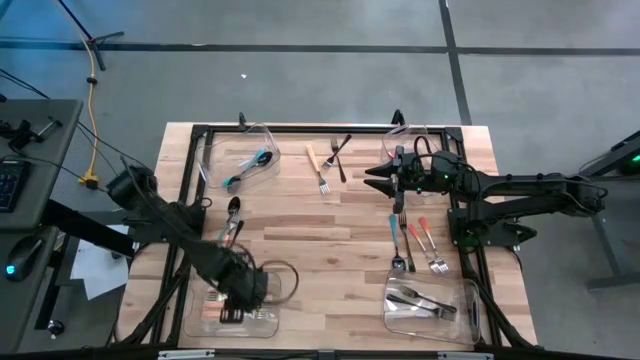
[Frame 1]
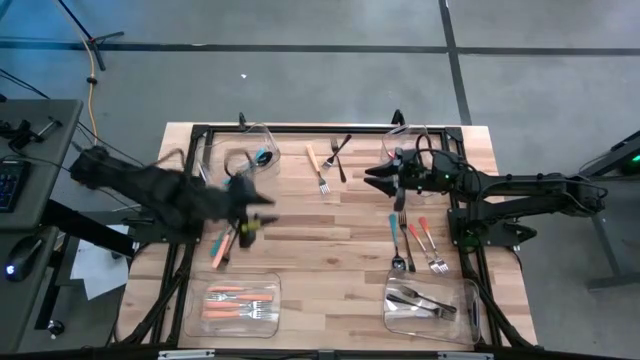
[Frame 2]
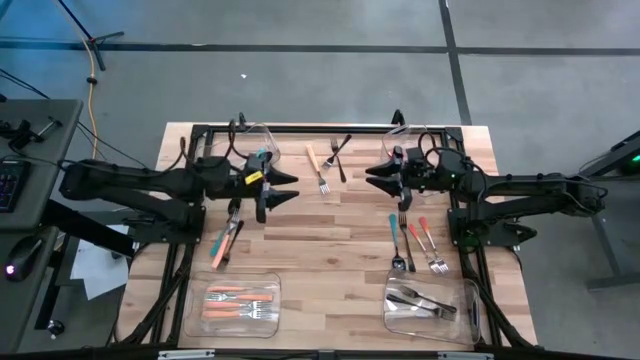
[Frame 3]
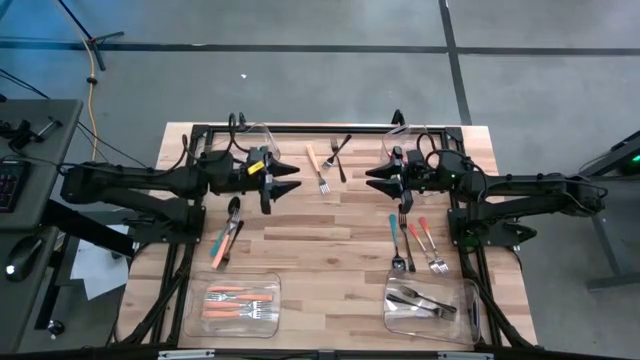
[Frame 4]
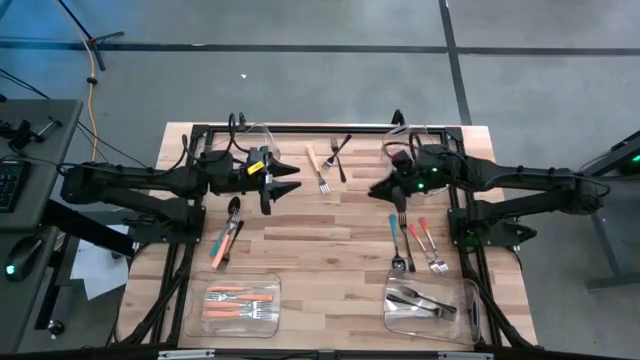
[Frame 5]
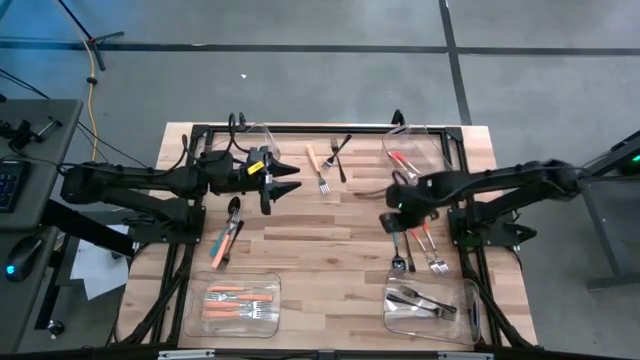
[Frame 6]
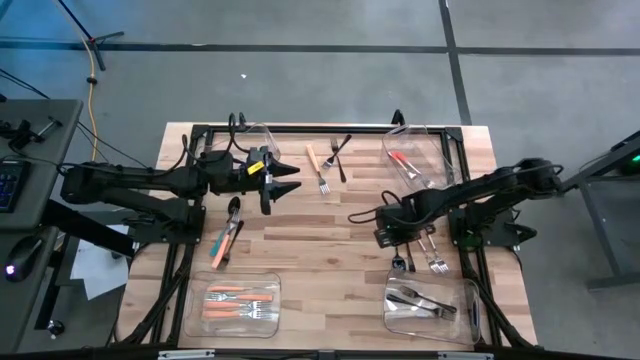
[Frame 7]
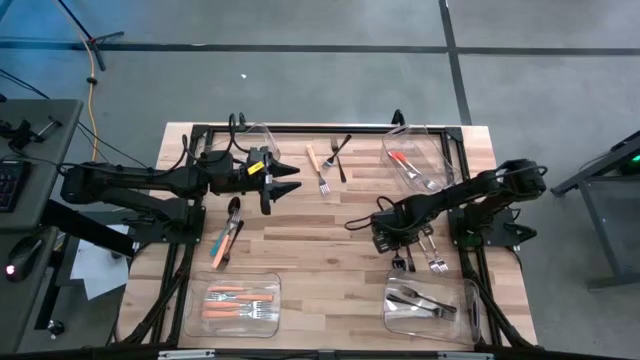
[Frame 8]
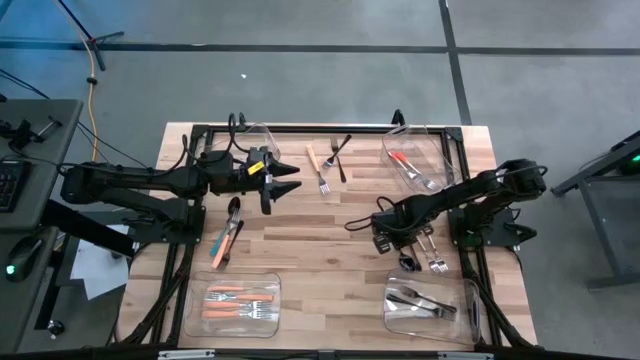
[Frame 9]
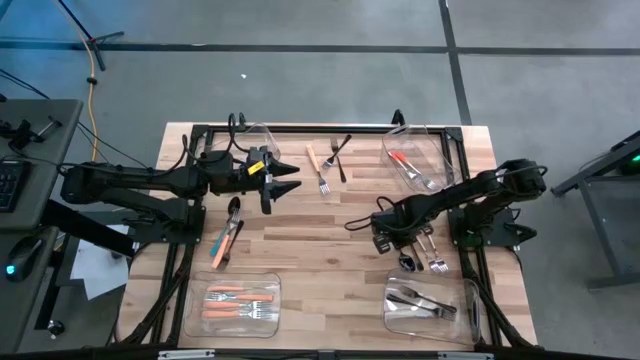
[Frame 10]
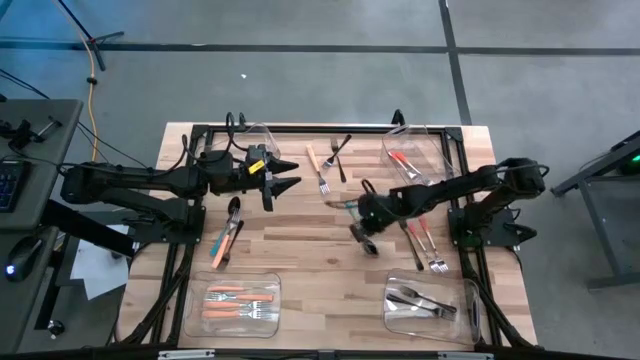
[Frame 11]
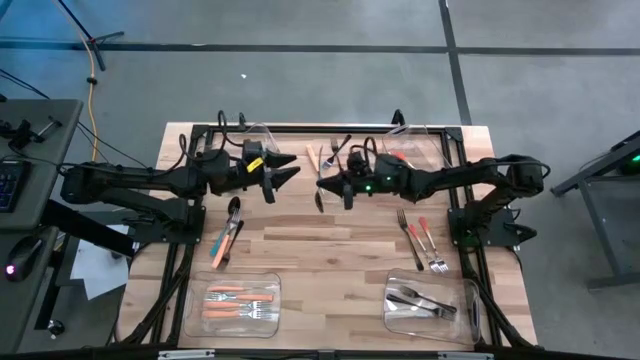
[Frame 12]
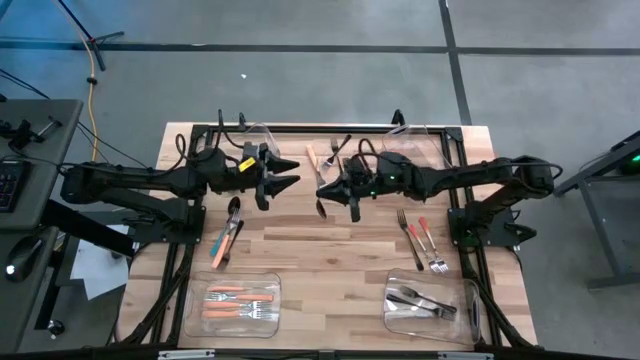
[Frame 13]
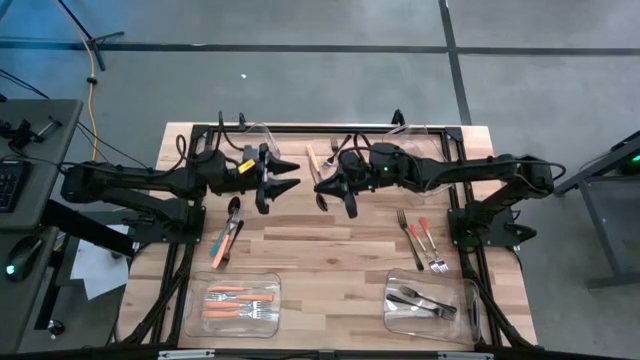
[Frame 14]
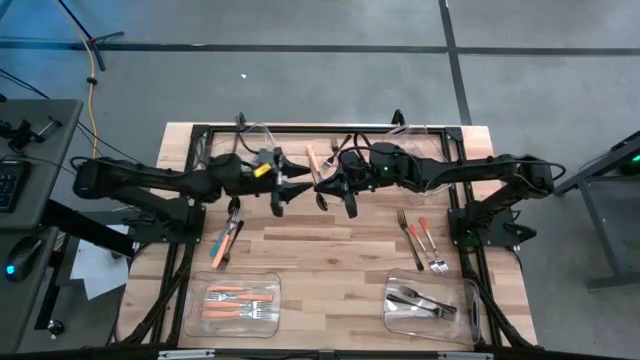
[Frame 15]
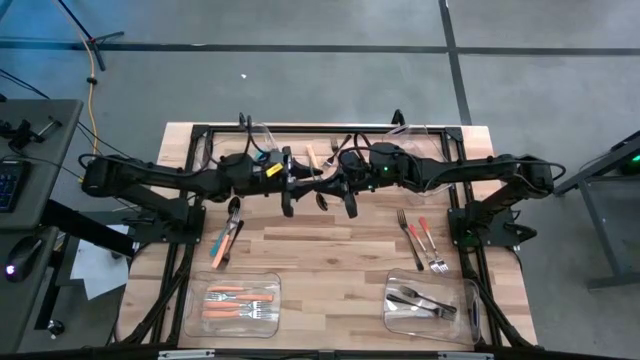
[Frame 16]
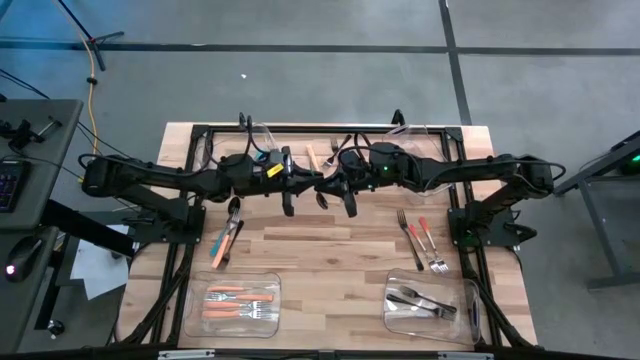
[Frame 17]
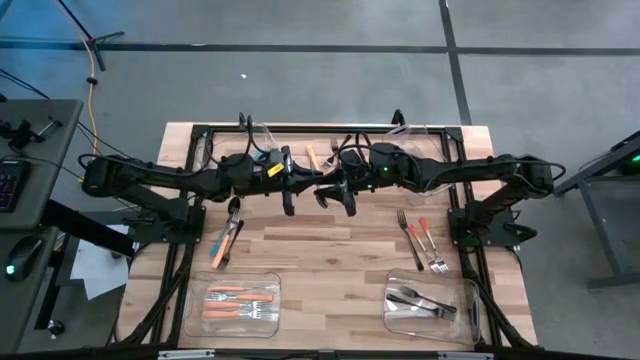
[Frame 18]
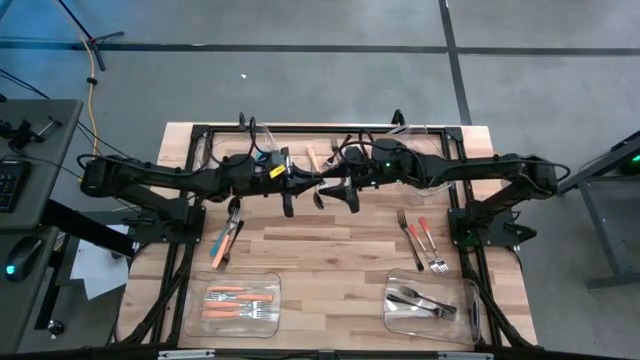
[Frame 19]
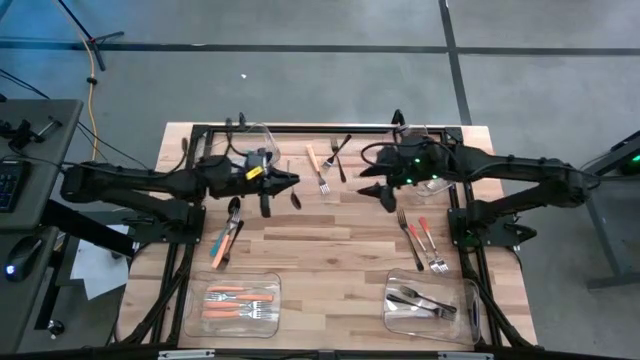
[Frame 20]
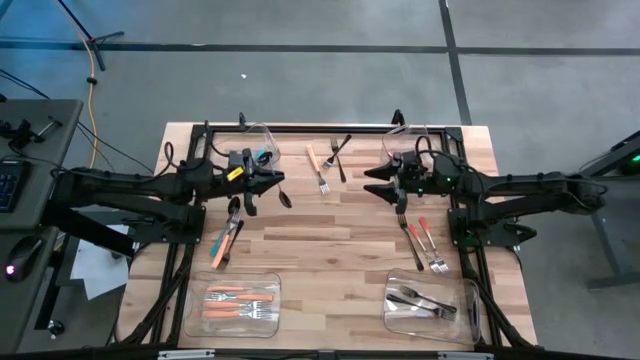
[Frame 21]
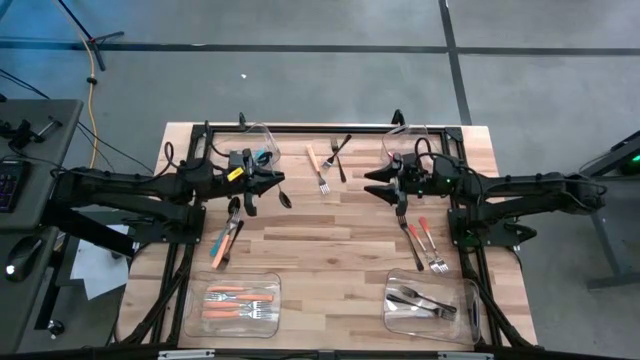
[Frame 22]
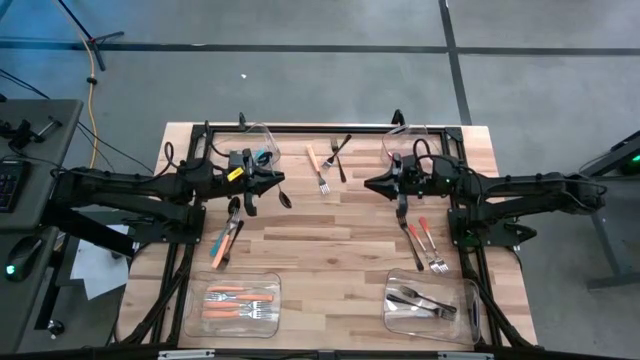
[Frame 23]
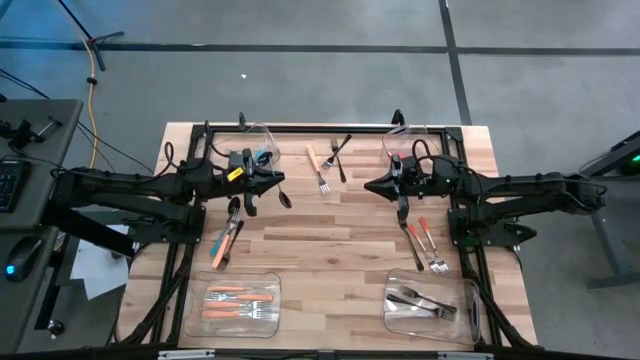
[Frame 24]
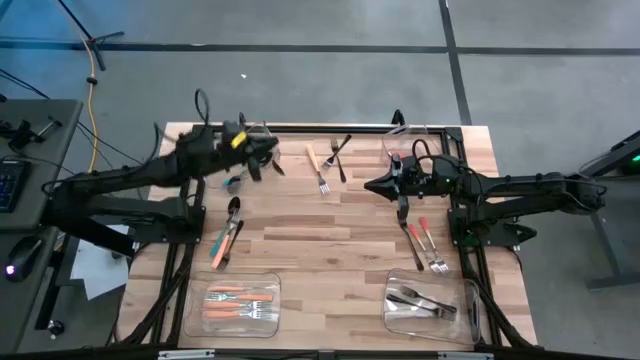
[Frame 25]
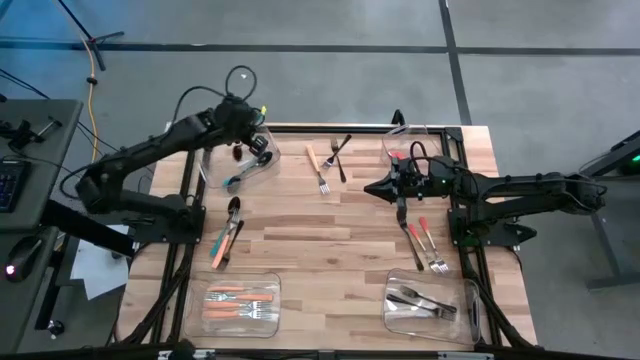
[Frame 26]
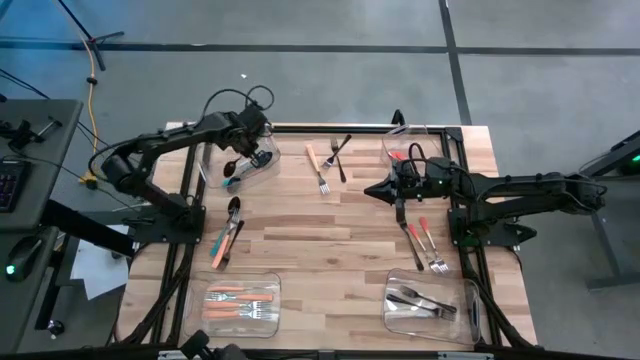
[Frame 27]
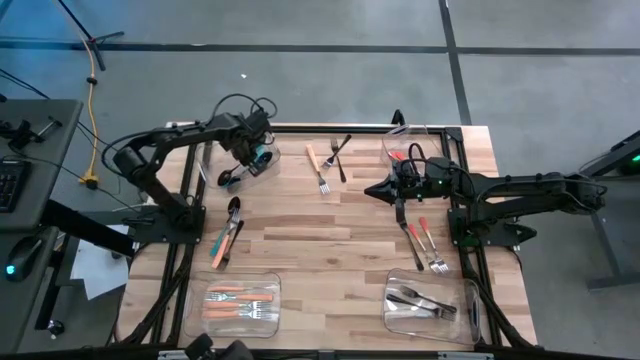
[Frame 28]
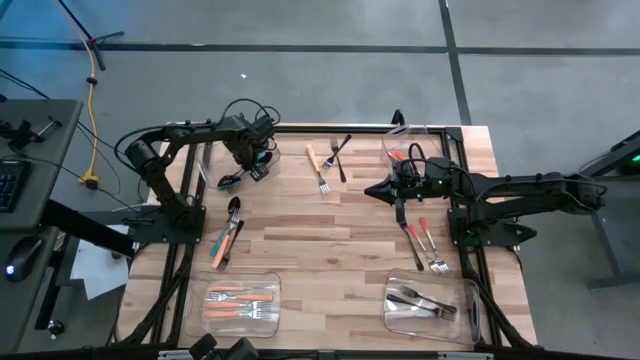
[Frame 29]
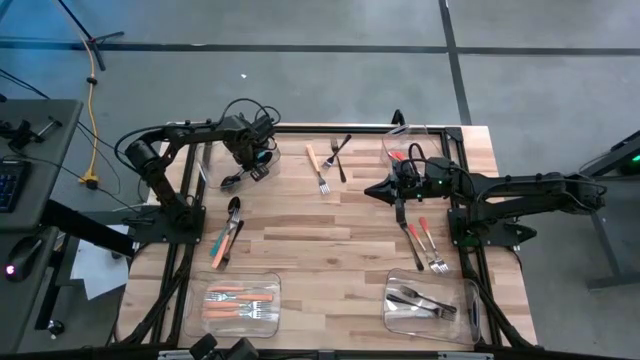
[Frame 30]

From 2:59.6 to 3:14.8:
Task: Sort silverware by color (type)
Put the blue spoon into the top left transparent bin

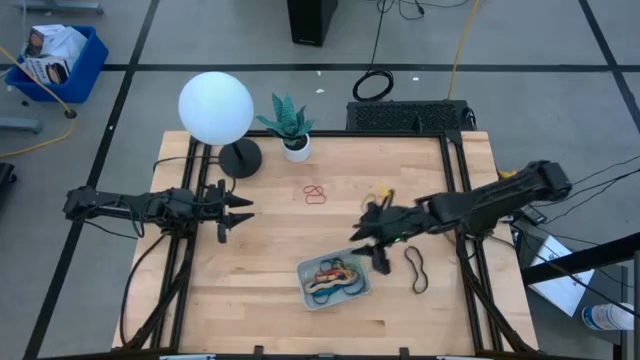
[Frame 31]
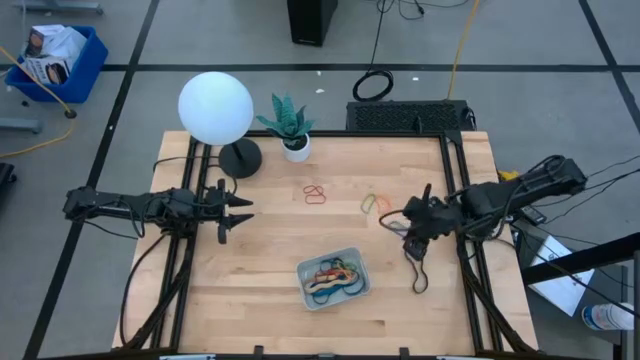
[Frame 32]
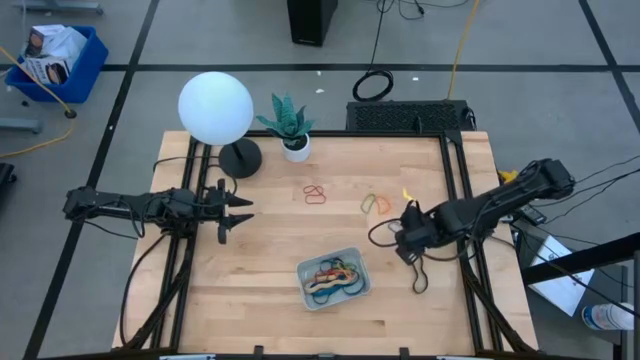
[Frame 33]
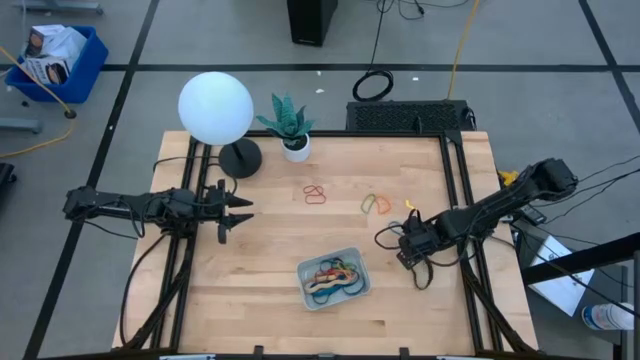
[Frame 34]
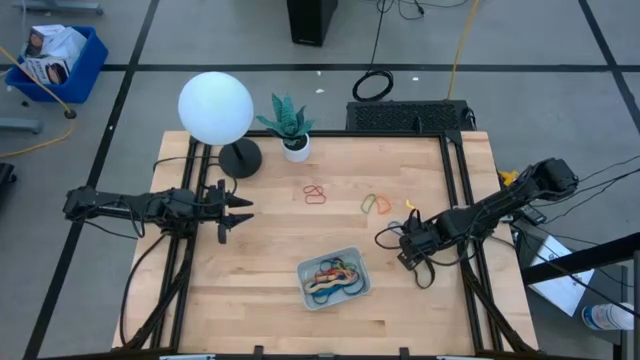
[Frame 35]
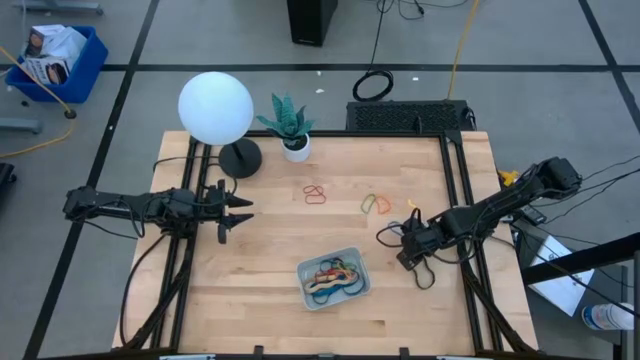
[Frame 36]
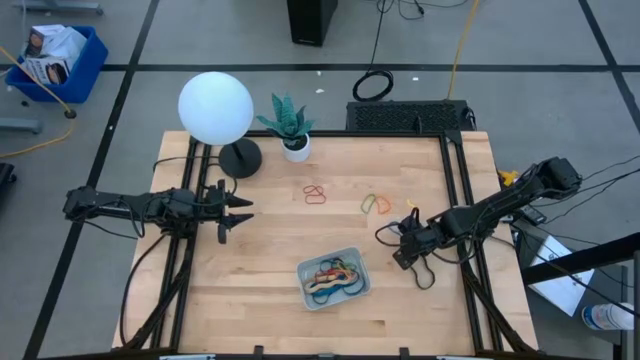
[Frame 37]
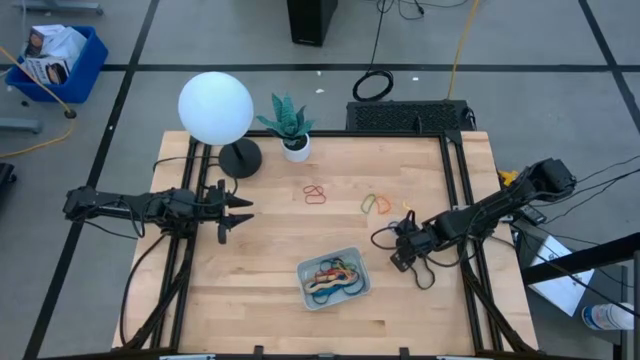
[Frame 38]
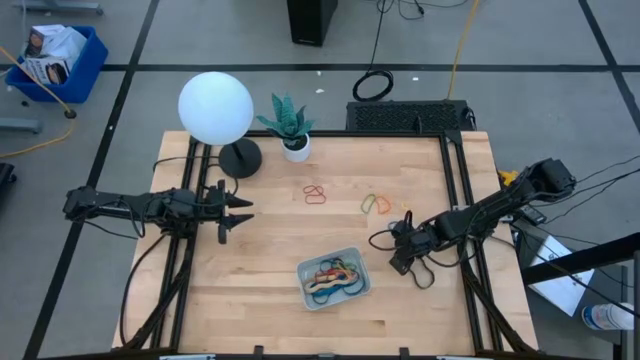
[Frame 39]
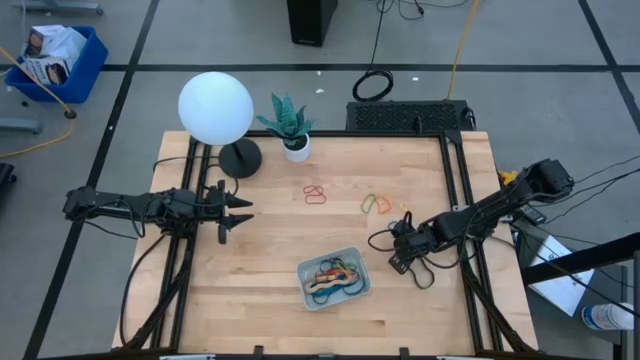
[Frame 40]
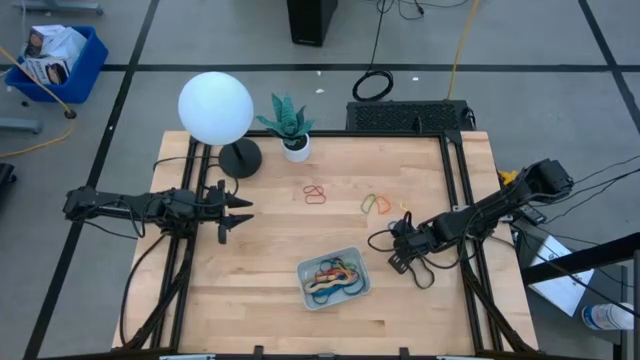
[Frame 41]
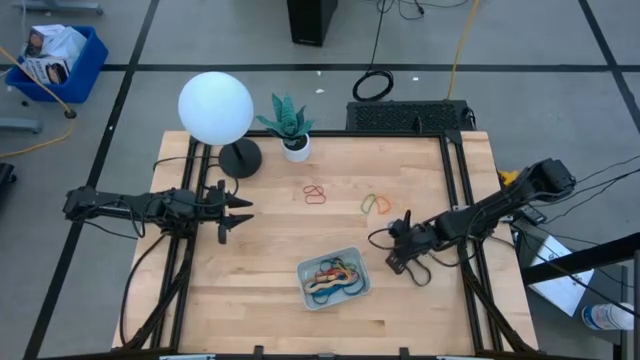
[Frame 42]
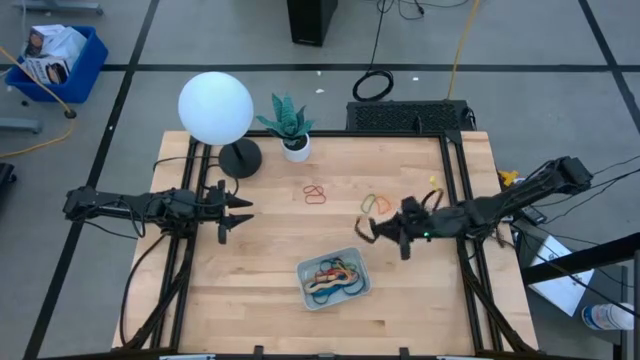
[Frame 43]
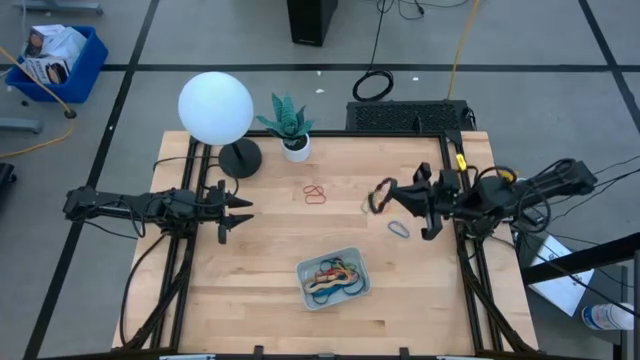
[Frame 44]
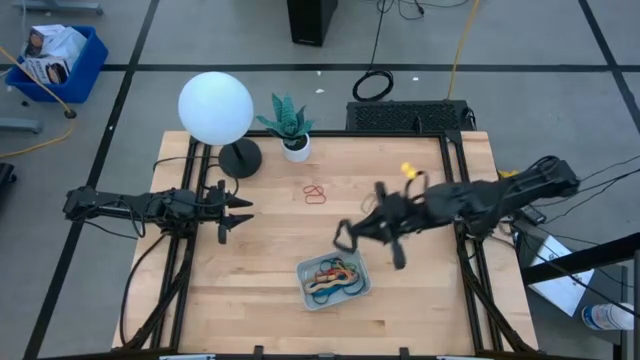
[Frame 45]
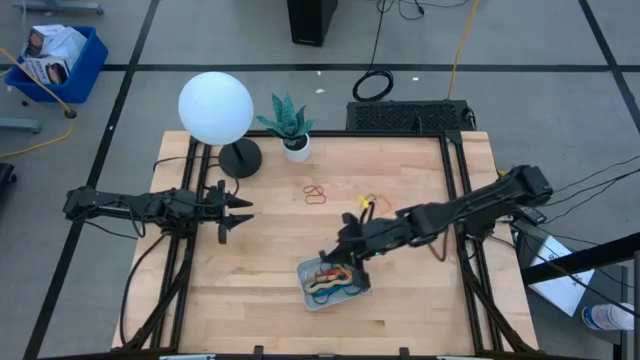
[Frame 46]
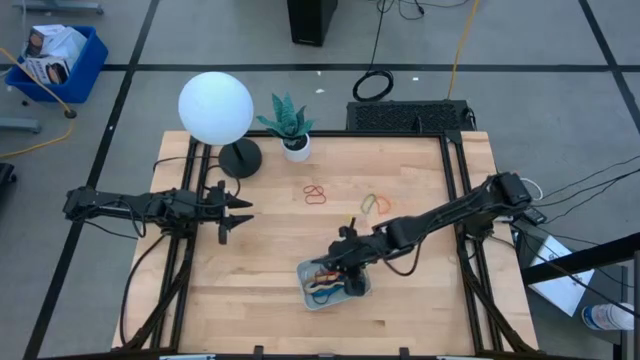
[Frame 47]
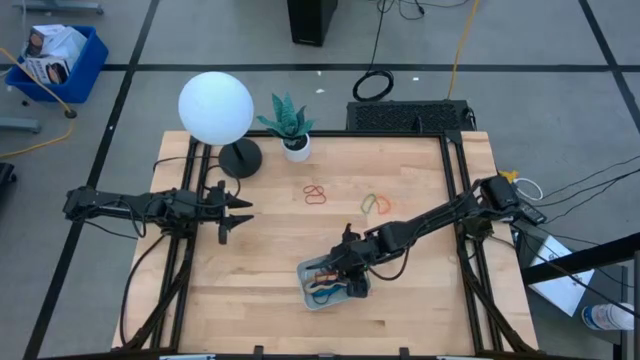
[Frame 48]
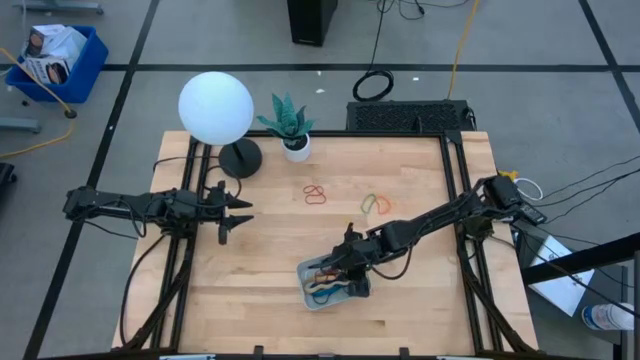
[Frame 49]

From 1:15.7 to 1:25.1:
Task: Pick and place rubber bands into bin
Put the black rubber band into the gray bin
